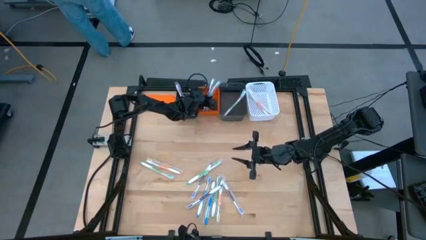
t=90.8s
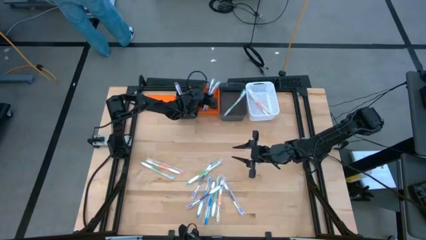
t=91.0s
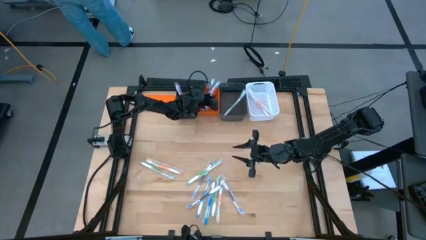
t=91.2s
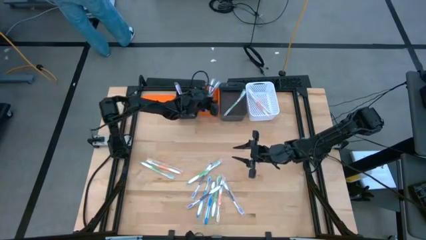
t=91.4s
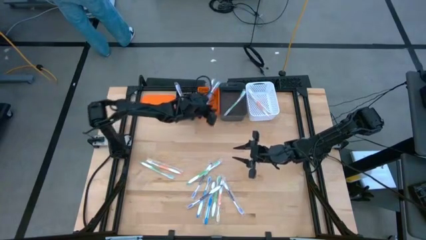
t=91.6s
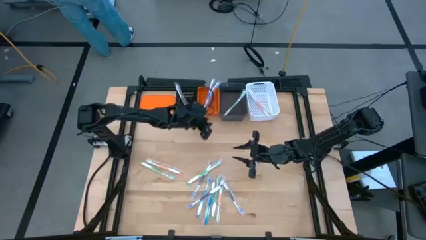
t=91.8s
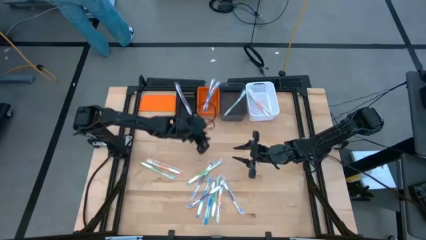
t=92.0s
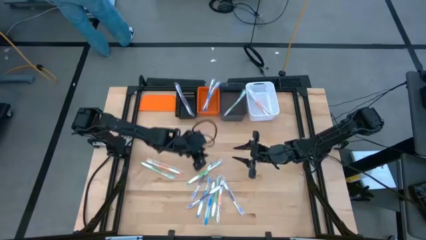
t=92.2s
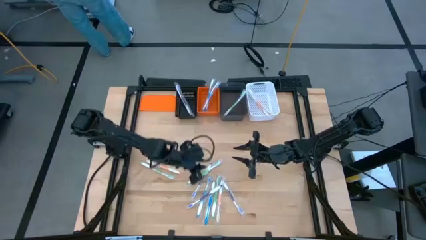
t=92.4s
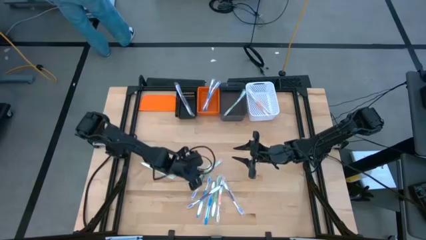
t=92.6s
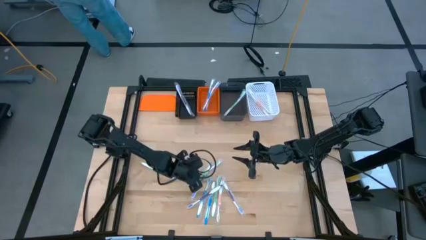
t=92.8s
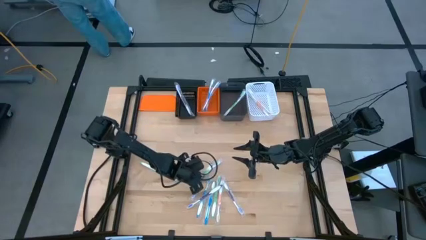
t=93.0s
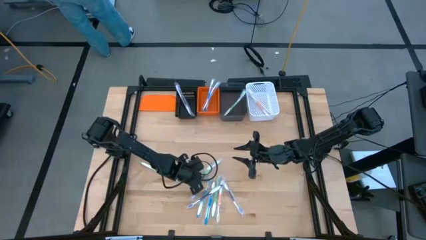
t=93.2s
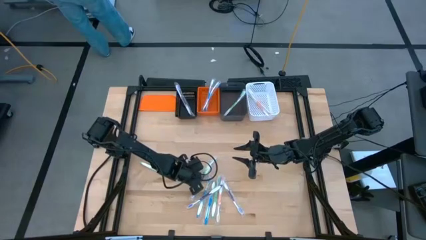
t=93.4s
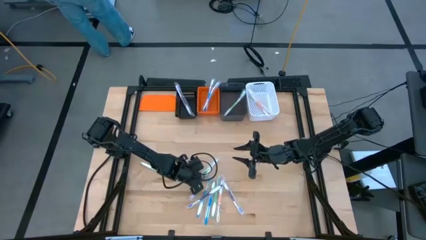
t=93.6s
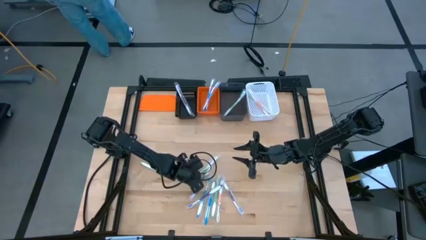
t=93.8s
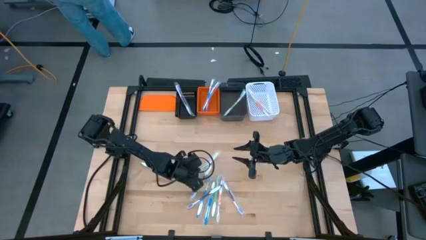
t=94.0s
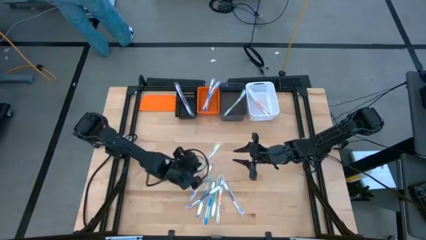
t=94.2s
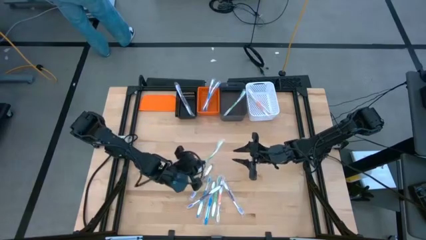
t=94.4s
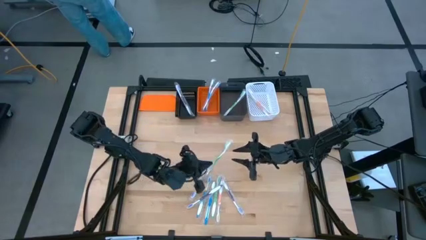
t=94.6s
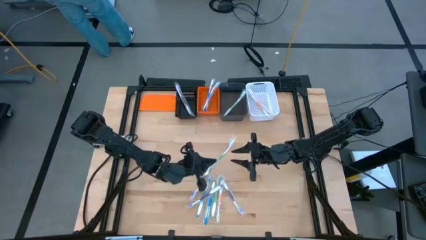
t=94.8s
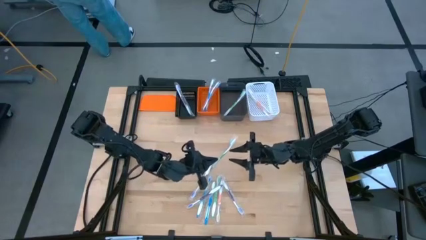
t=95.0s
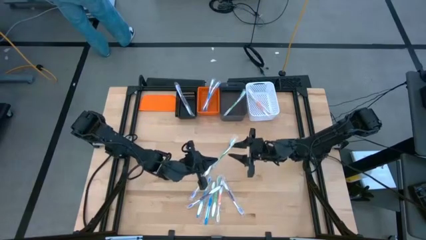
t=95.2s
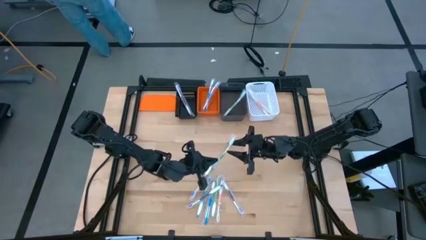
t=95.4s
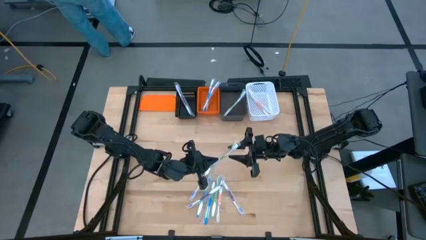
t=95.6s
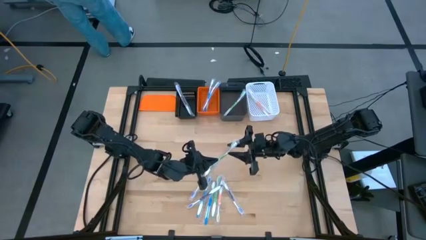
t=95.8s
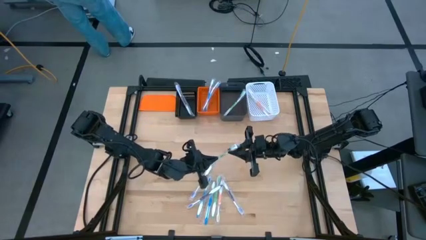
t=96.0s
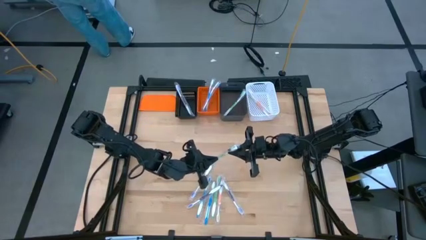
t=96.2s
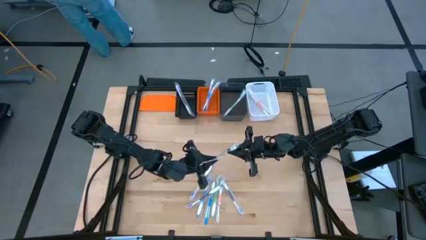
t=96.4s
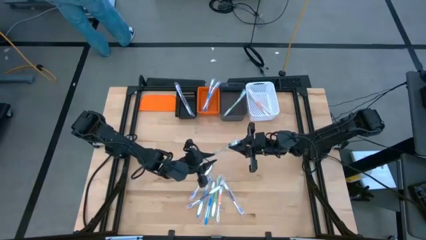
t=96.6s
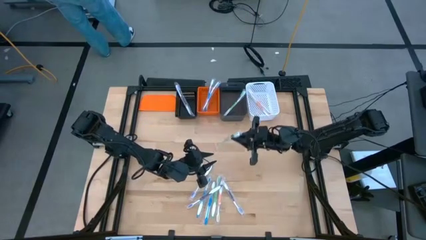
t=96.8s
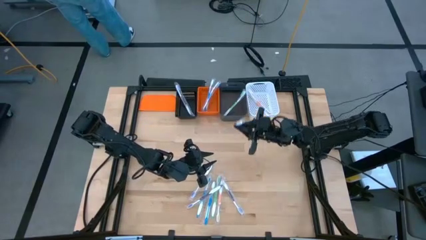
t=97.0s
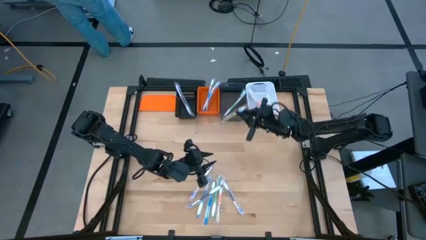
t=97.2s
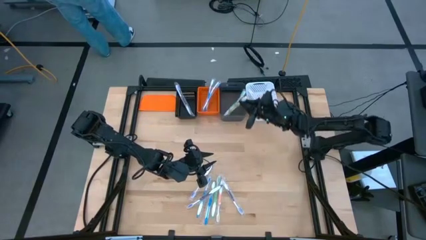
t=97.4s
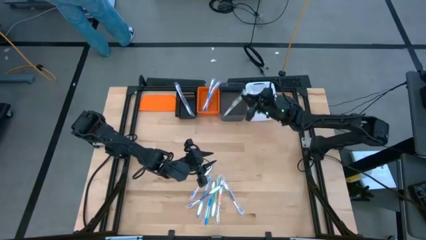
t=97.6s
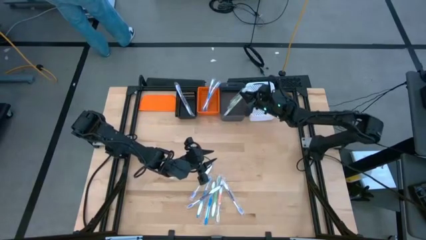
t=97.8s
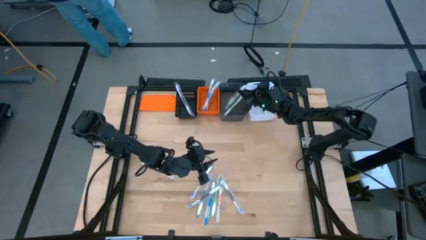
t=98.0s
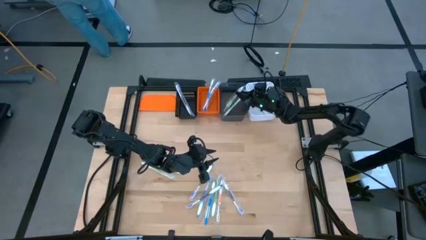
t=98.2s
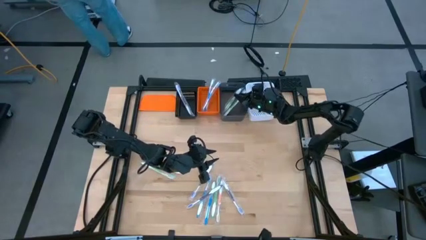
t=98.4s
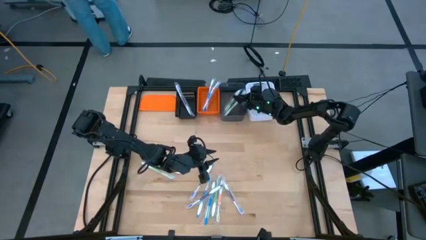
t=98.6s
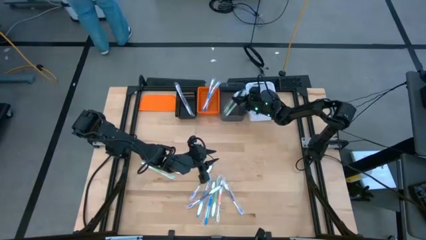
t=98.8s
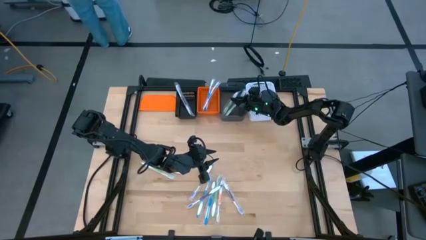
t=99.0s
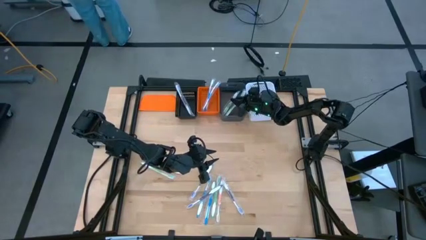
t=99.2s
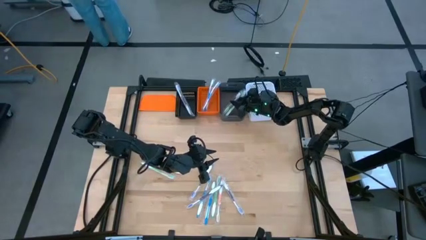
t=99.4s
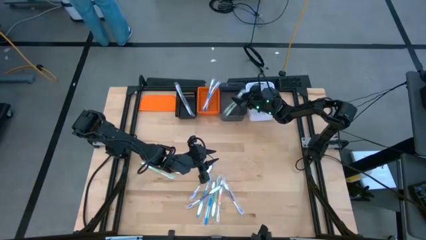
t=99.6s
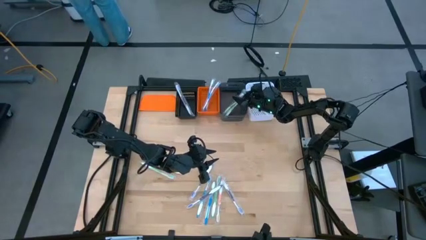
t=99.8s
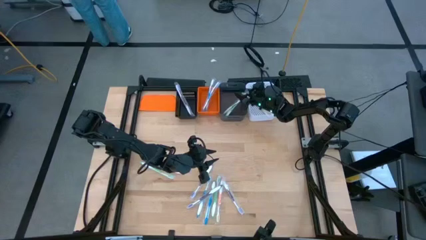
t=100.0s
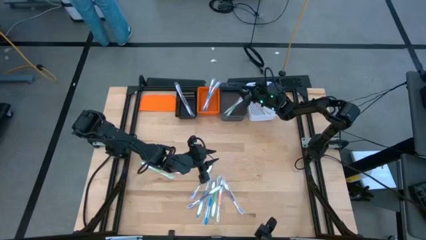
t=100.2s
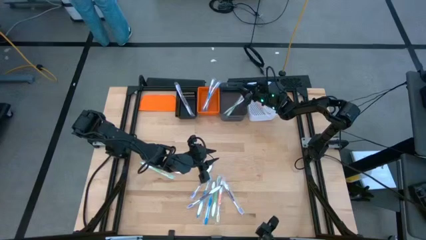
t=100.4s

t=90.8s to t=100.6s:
Task: Pick & Place Toothbrushes
Put the green toothbrush into the black bin

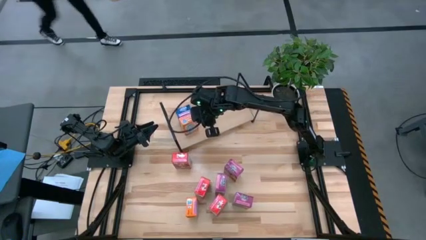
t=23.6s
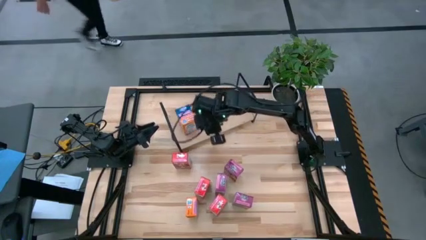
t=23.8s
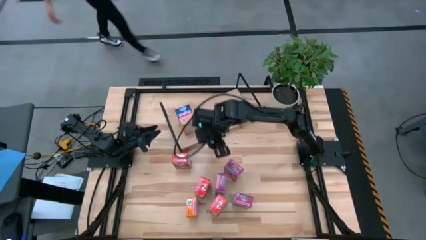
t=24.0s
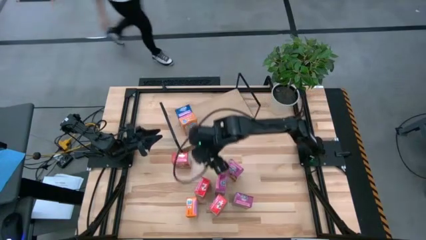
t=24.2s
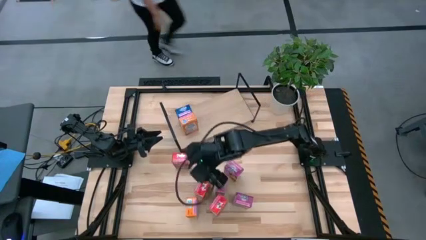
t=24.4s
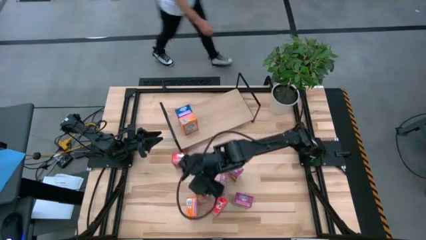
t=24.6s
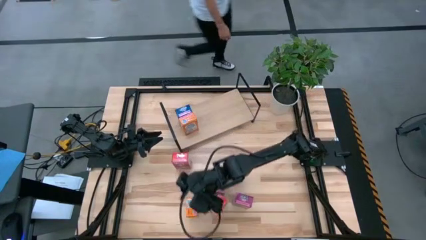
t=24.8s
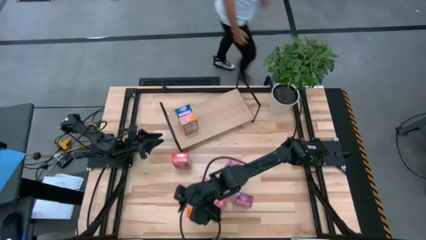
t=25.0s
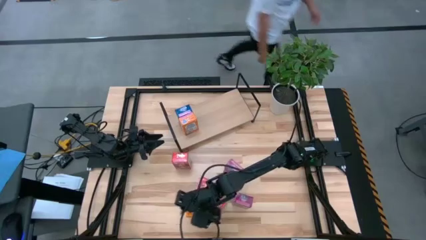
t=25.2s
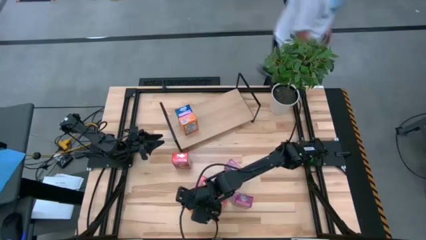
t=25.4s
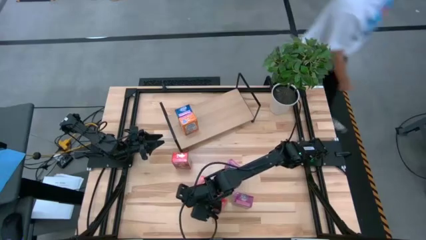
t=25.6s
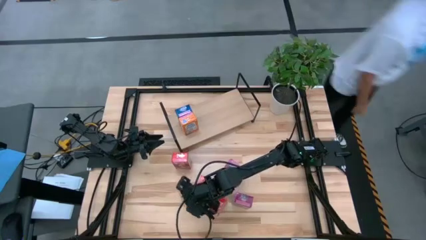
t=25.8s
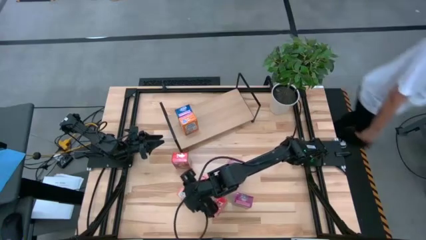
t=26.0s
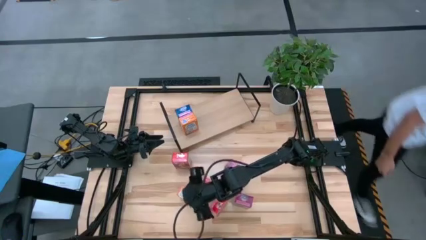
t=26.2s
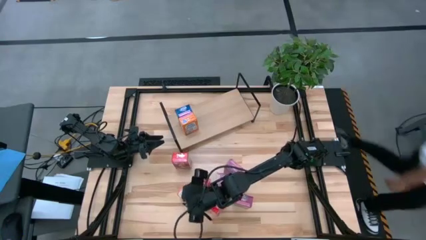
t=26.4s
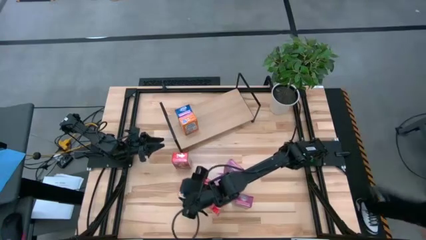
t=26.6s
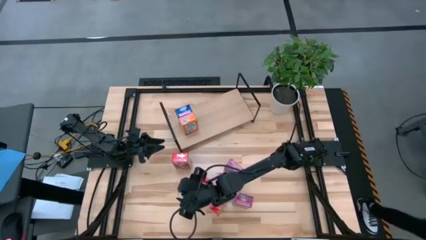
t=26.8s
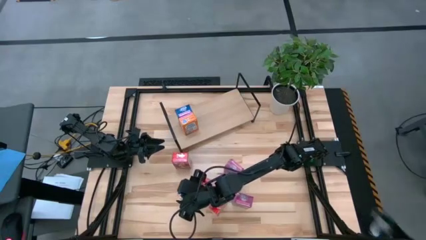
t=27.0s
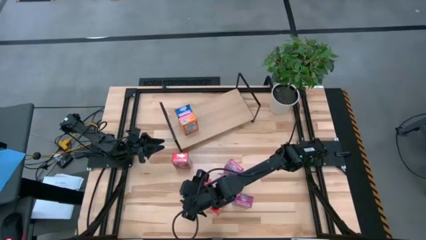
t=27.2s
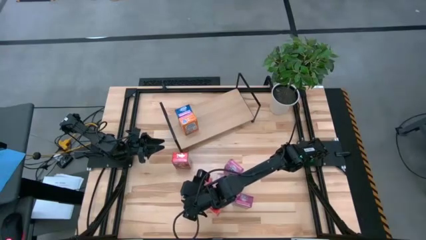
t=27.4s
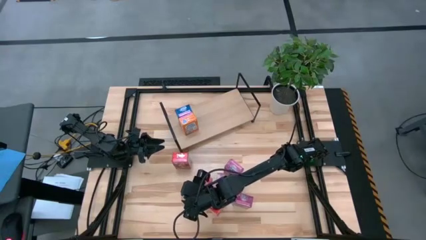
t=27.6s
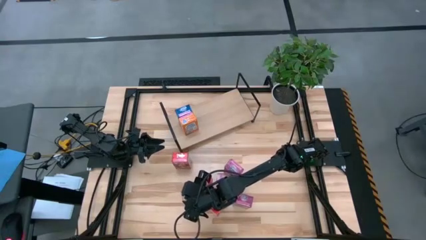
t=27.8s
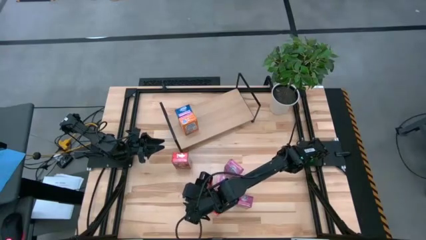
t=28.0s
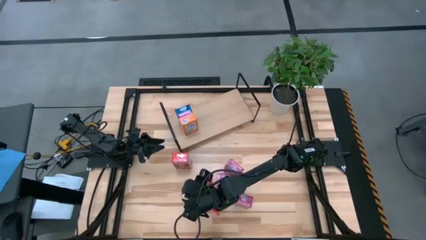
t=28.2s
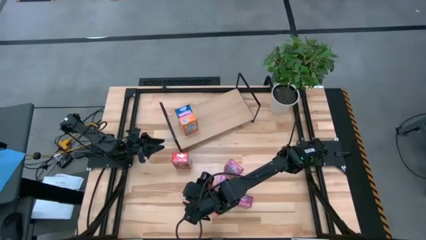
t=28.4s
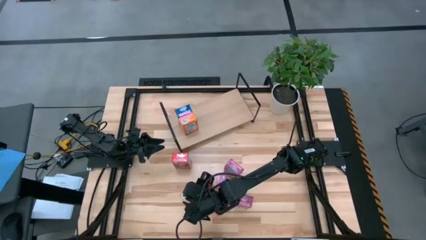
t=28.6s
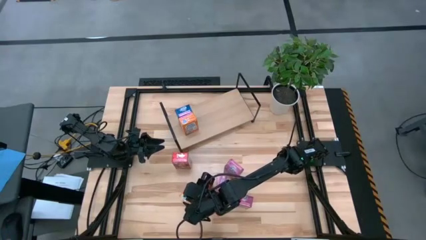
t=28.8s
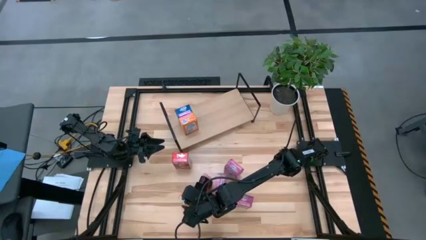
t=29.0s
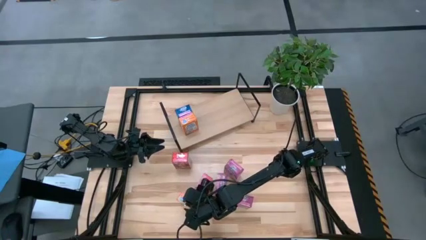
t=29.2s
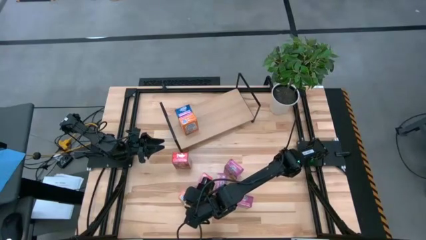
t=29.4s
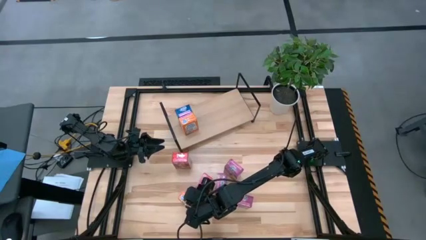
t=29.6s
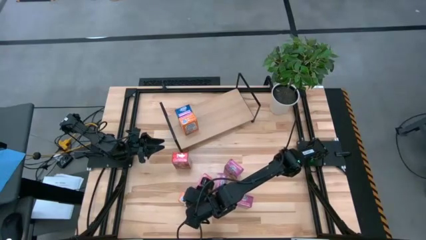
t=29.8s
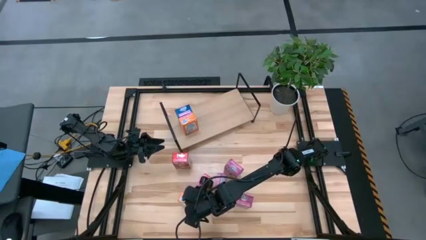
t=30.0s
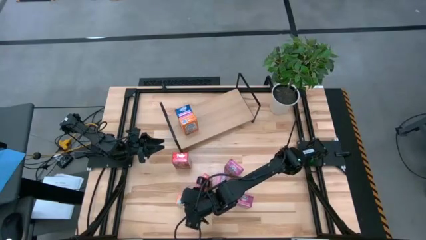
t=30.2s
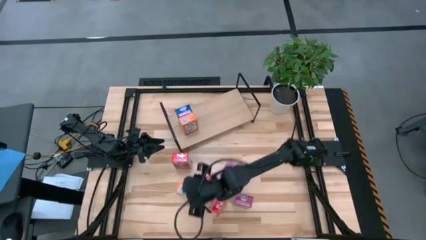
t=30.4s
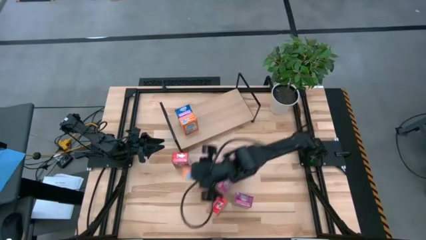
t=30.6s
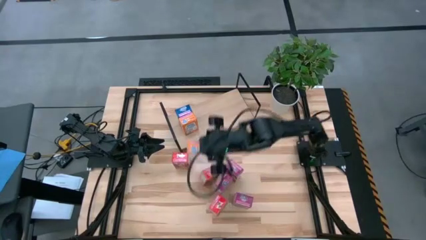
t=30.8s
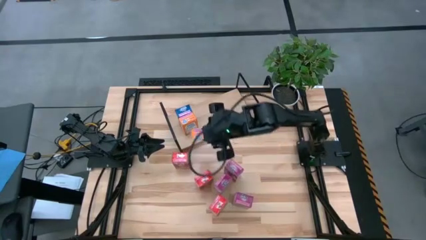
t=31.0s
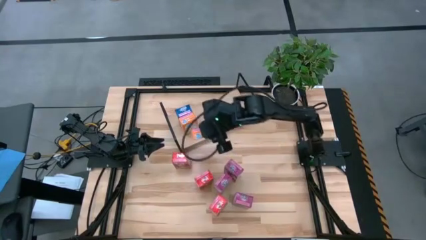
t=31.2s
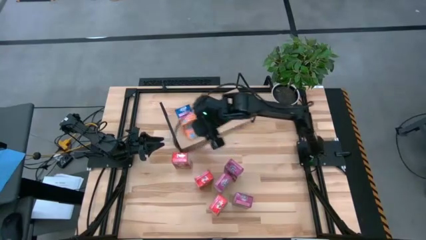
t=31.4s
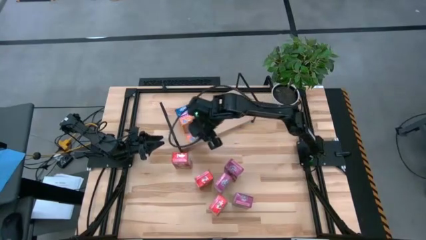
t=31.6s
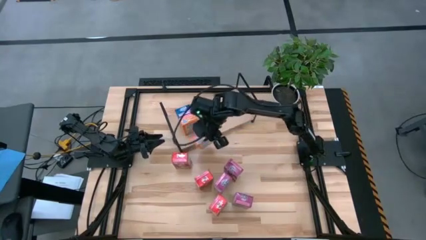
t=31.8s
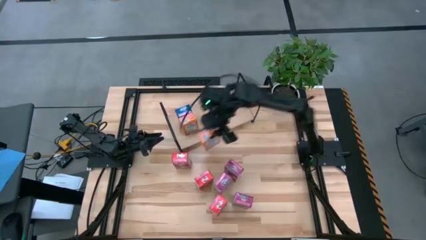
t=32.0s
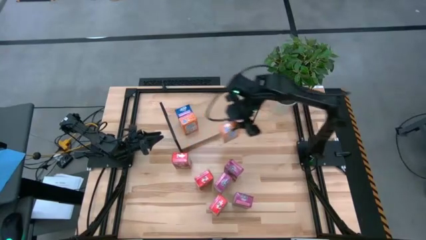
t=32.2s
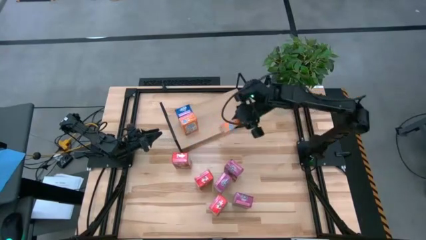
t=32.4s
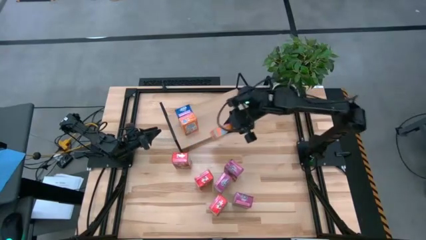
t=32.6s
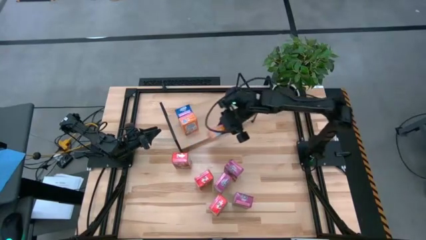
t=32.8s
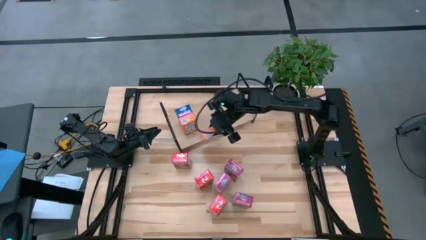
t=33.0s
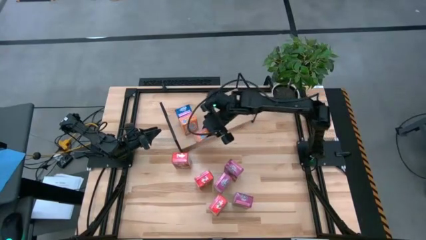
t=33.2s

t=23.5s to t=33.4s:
Task: Stack cereal on shelf
Put the orange cereal box on the shelf aligned with the other orange cereal box
